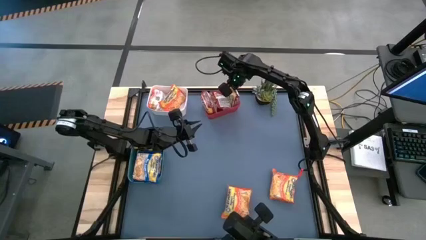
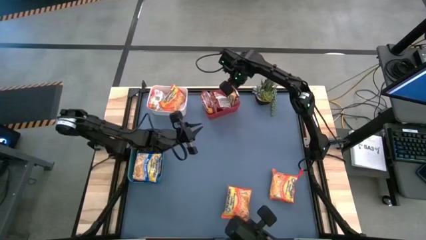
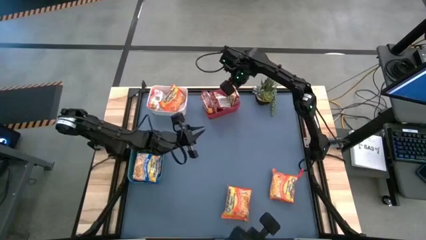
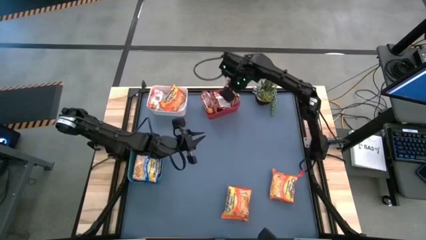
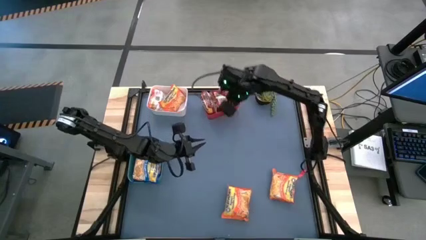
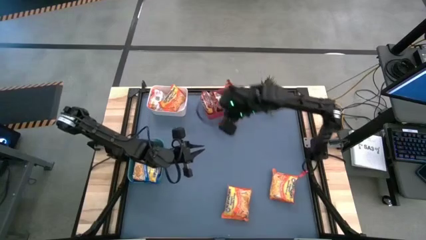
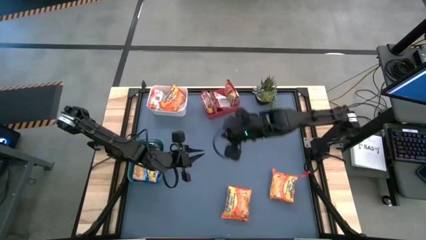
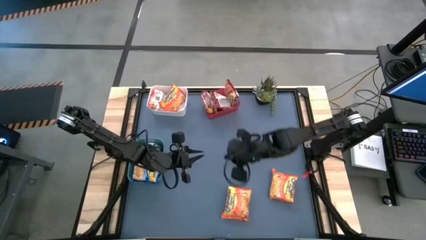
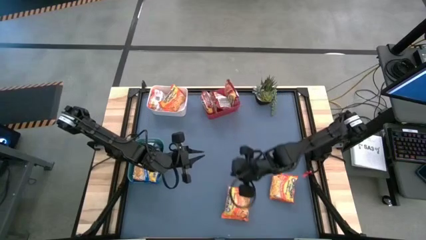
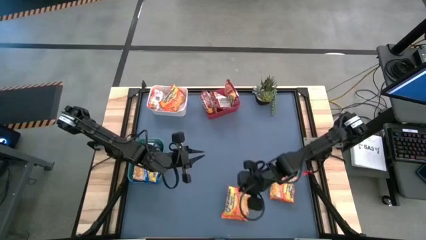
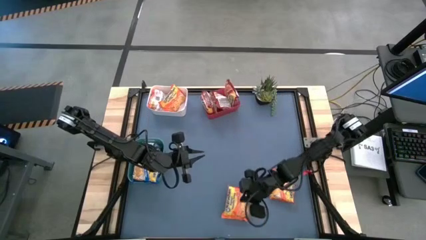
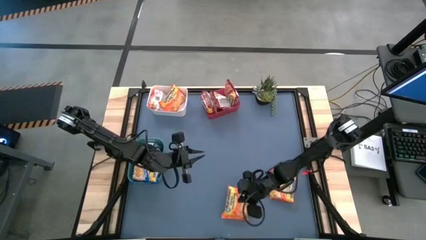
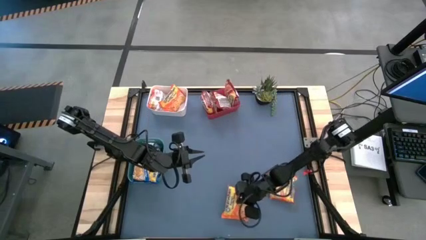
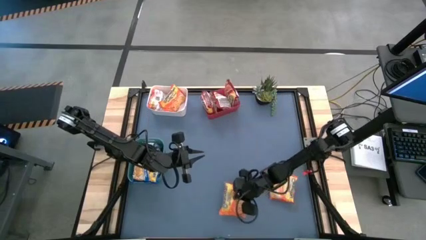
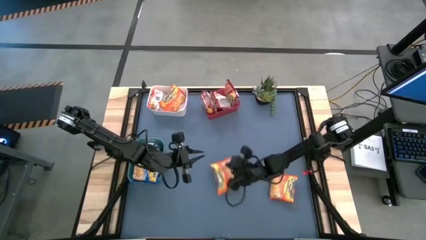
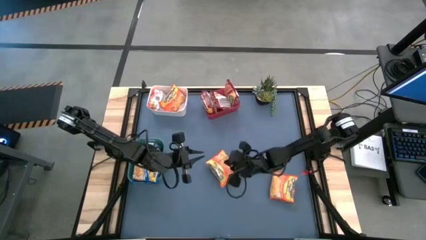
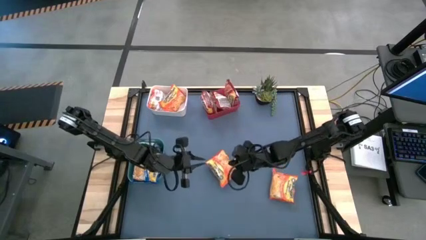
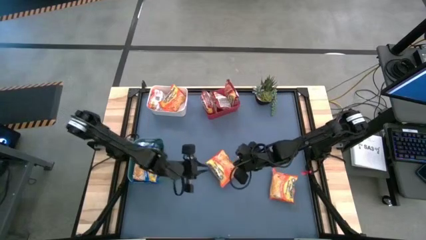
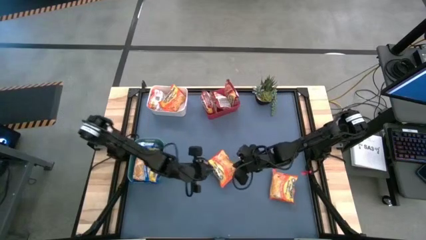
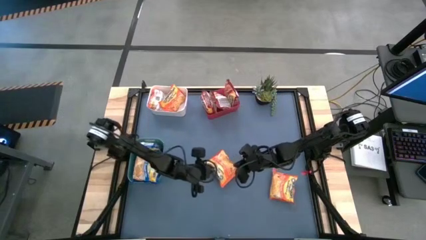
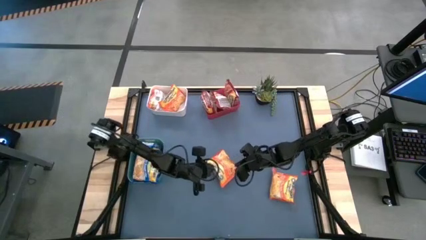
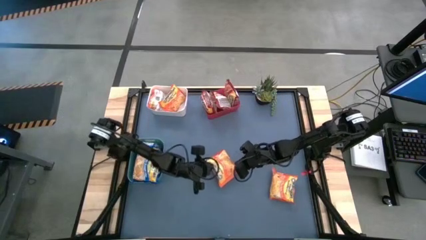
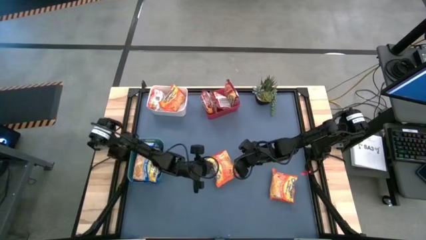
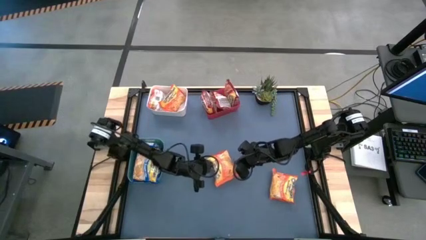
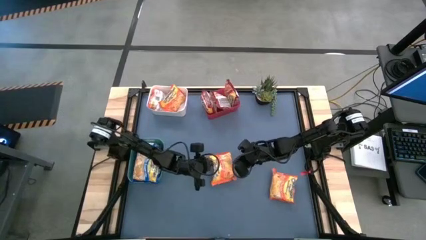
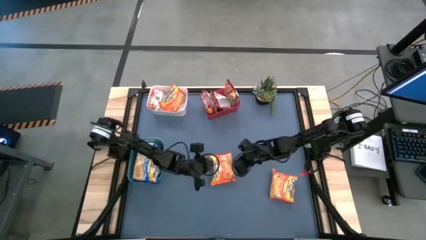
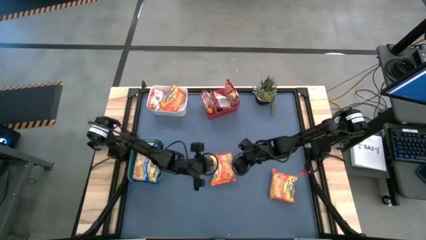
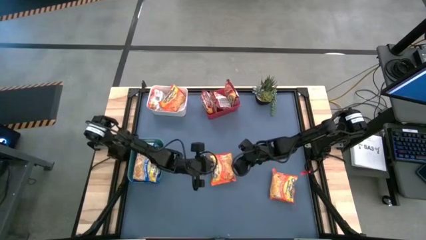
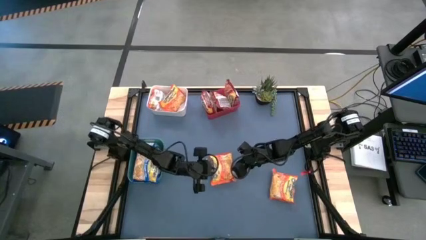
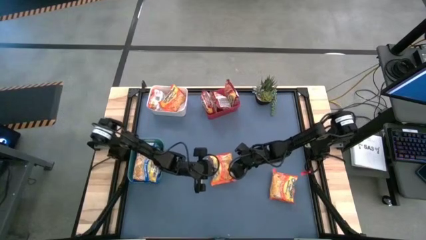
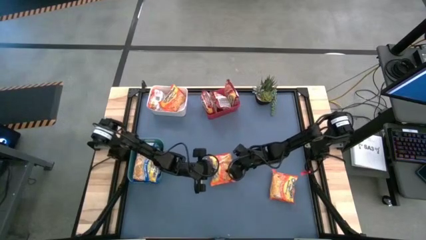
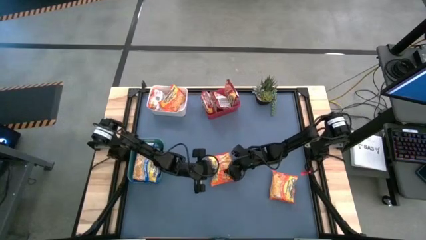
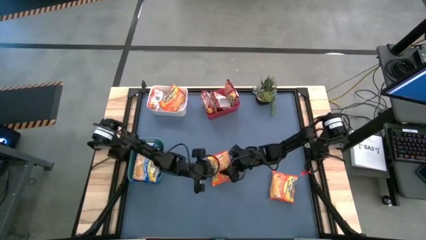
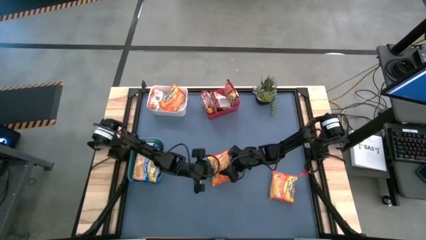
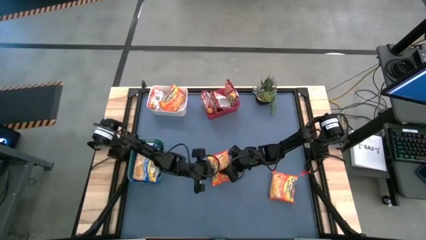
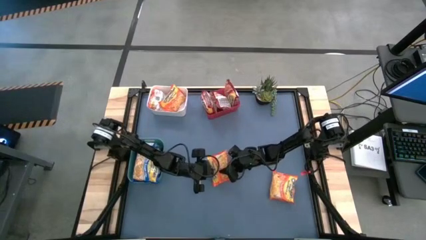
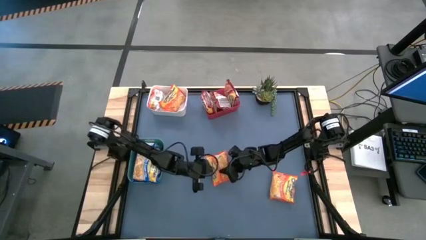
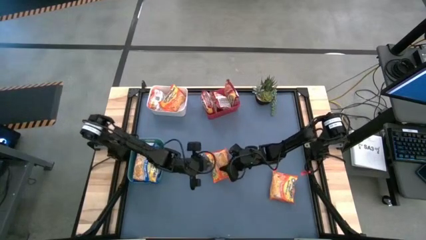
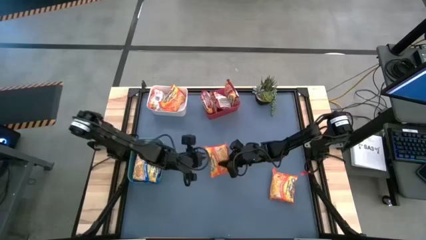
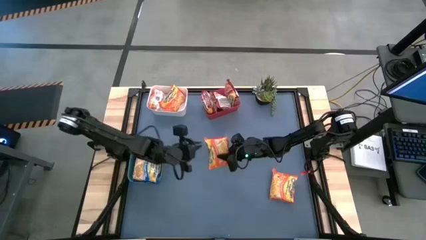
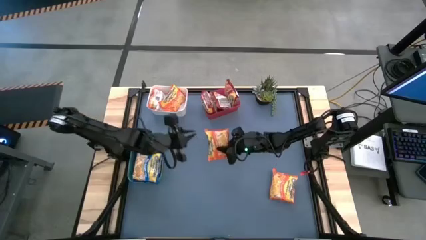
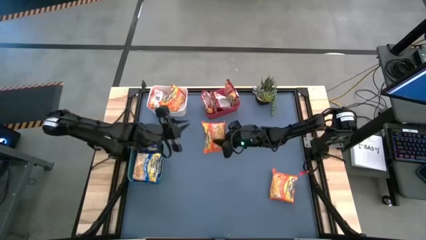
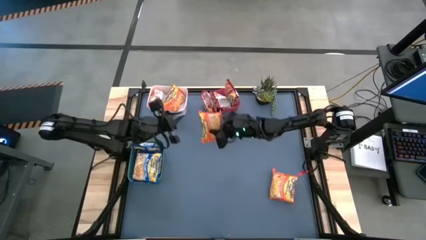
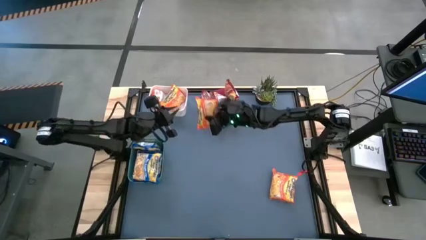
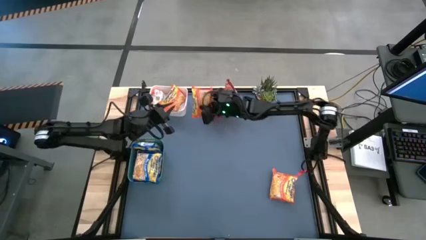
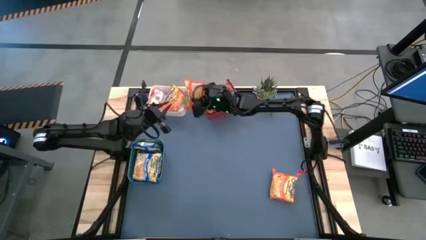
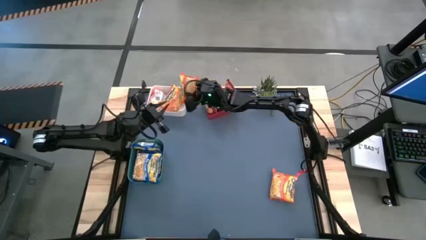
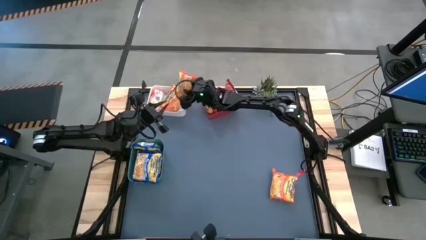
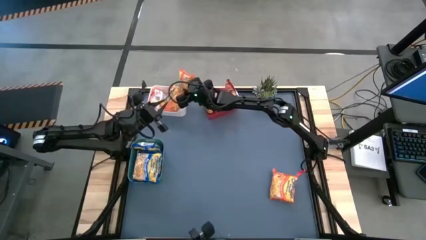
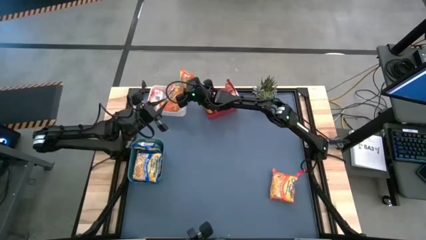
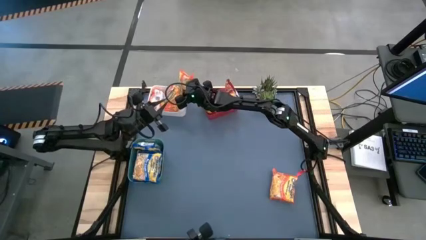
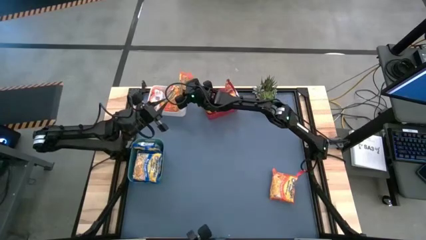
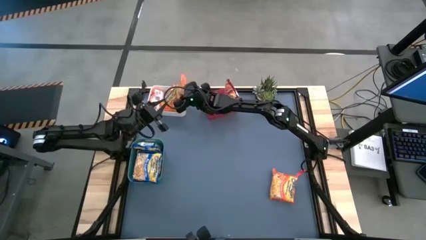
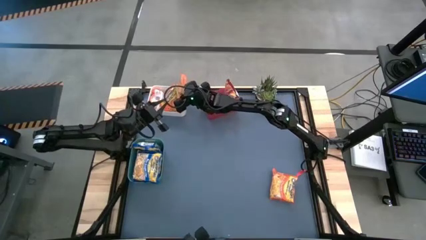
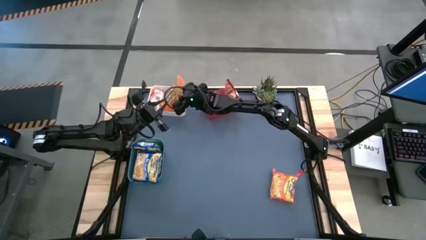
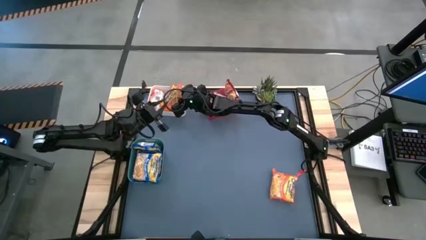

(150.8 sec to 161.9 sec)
Task: Sort Maruchan noodles
Put the orange noodle pack into the white bin

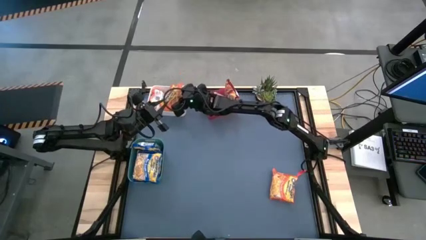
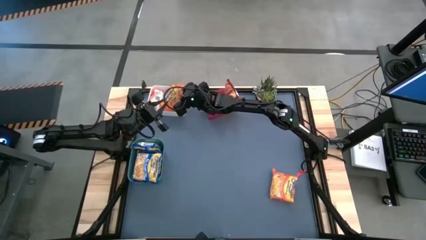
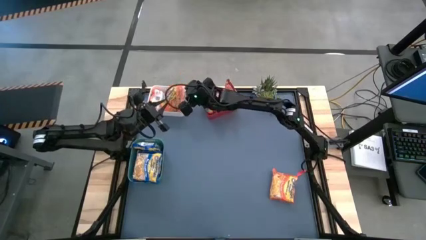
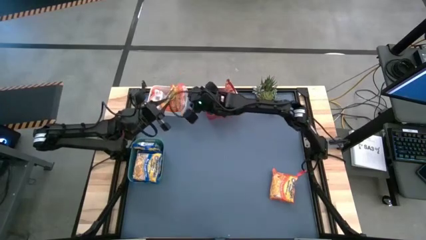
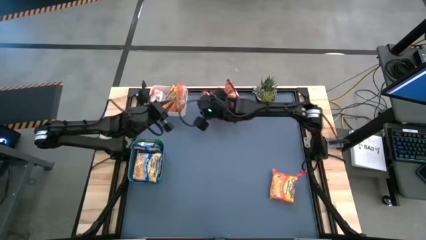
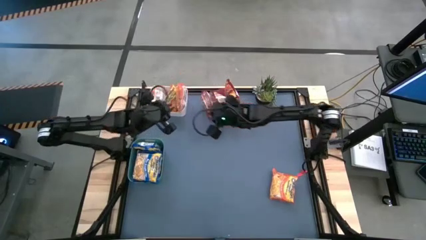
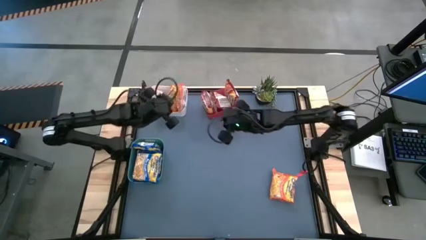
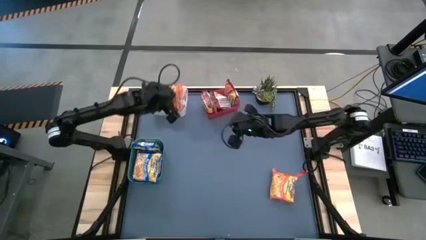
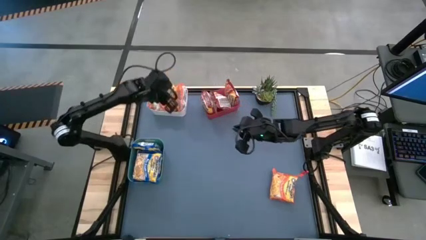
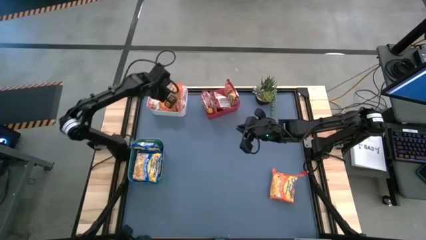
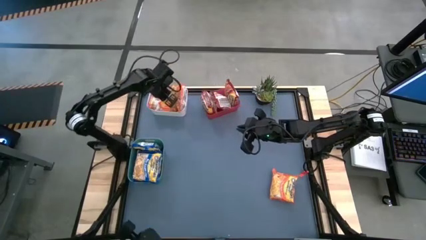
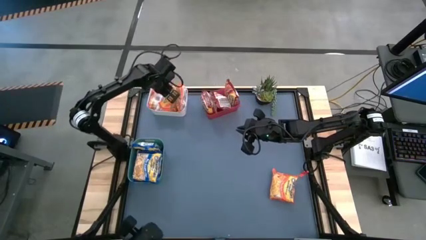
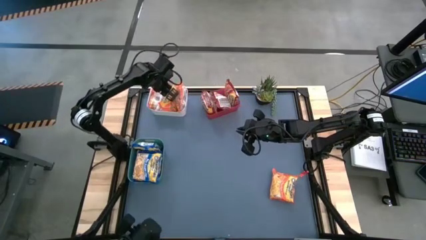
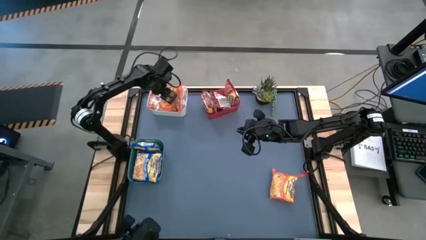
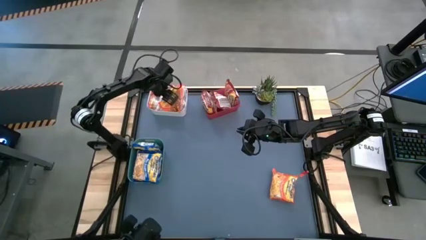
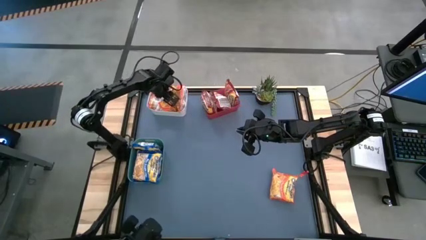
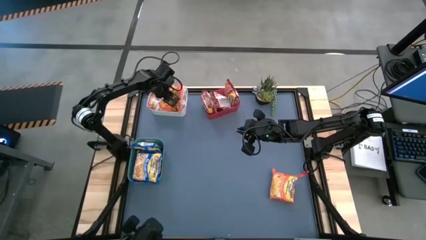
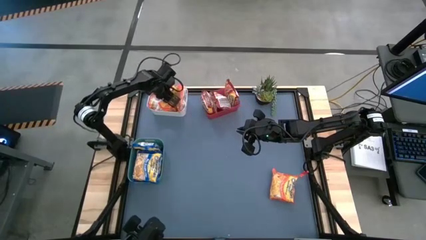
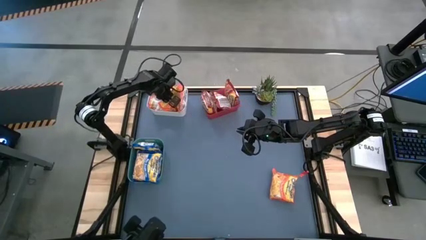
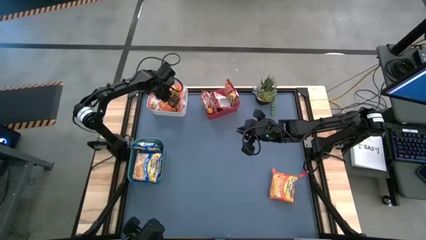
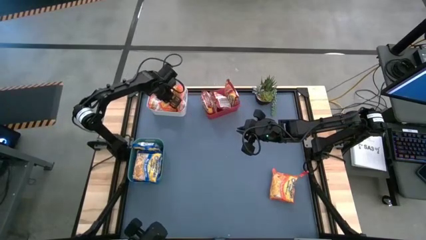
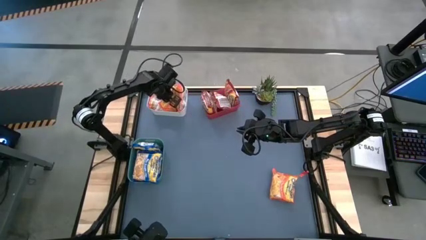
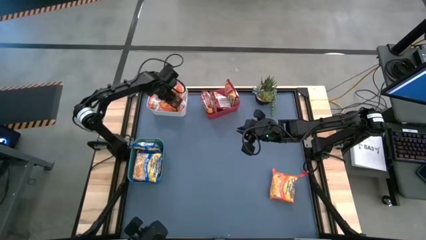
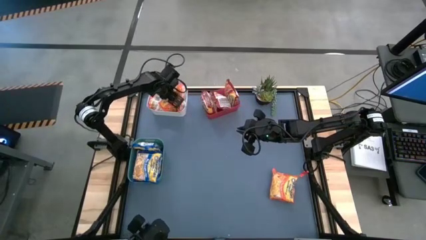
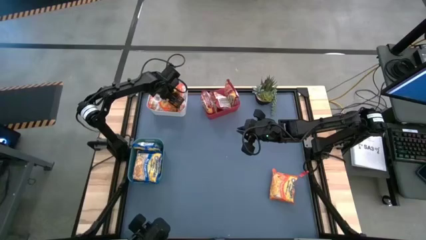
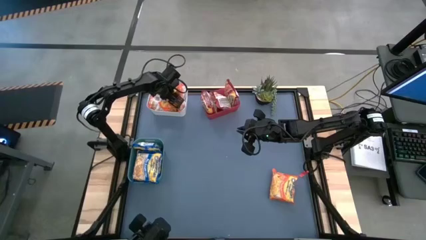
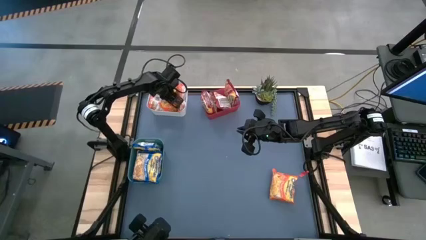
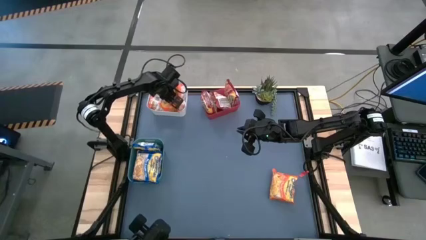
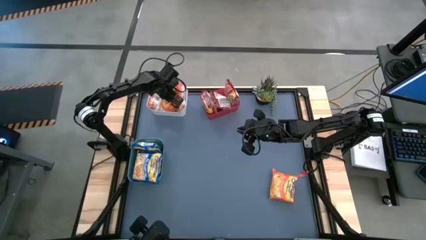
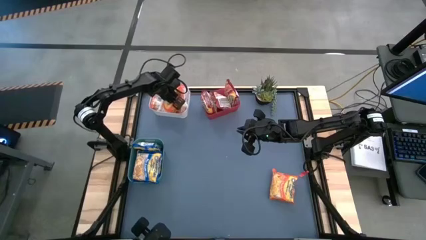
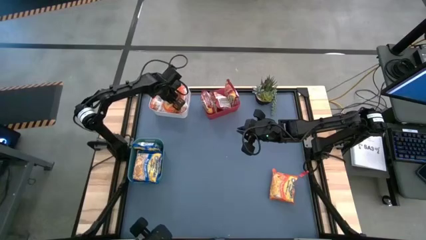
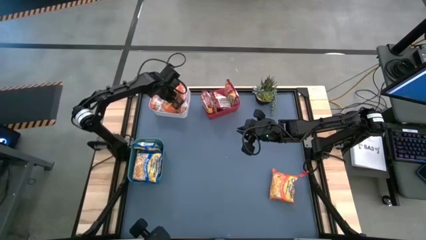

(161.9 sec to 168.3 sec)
Adjust the orange noodle pack in the white bin
